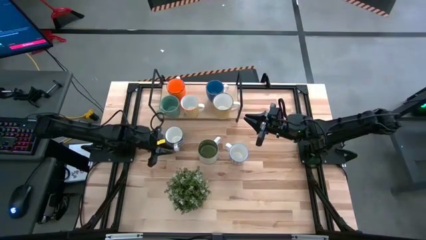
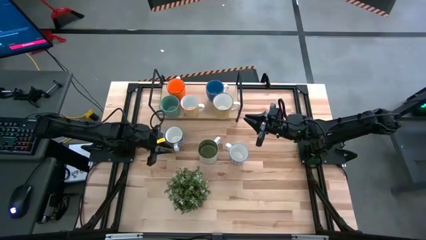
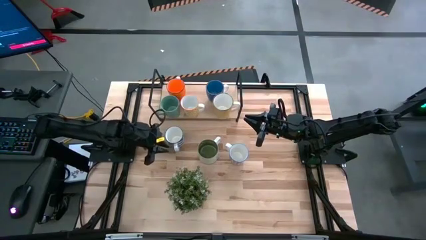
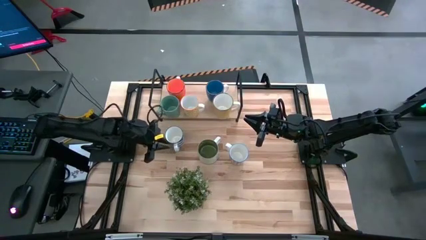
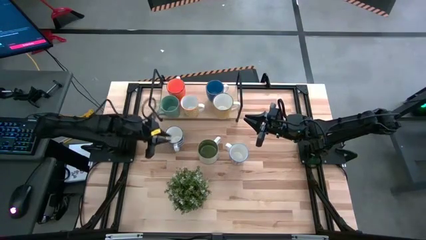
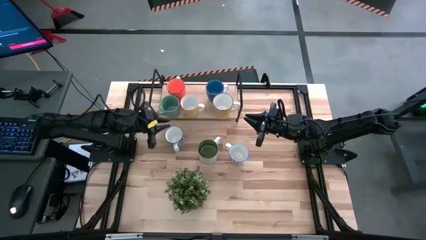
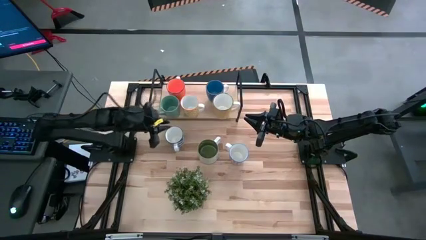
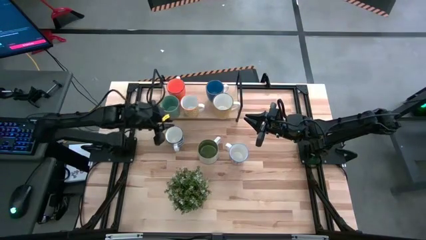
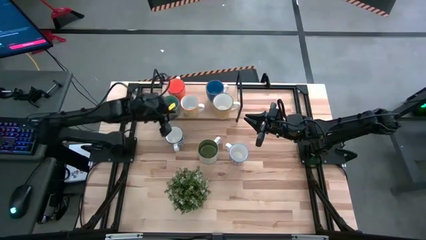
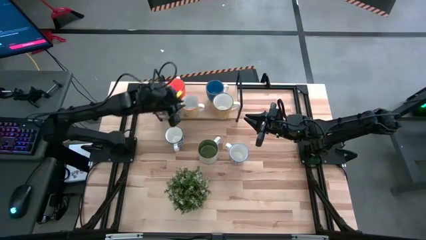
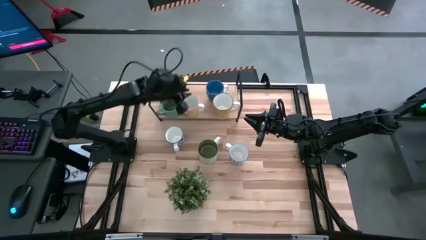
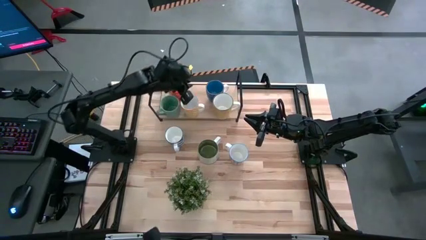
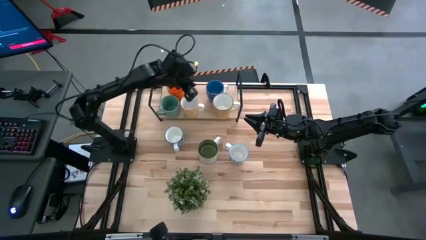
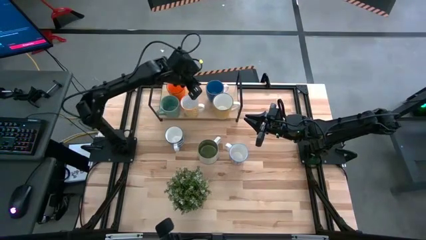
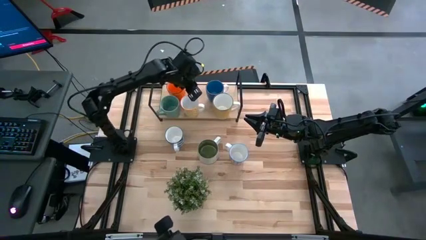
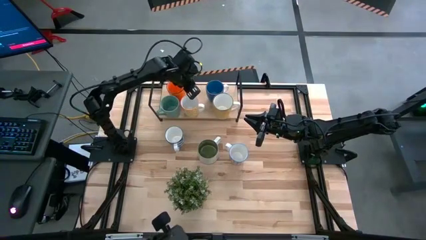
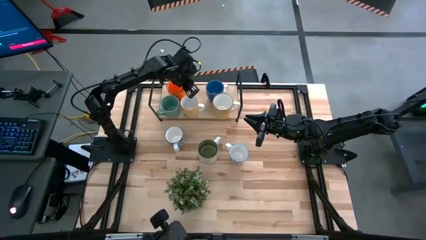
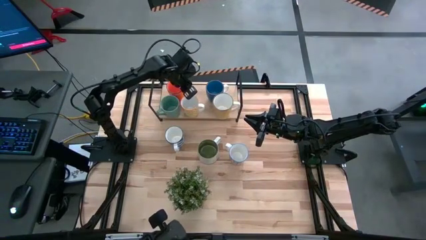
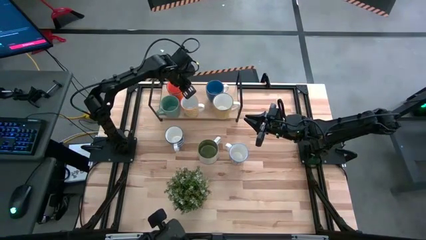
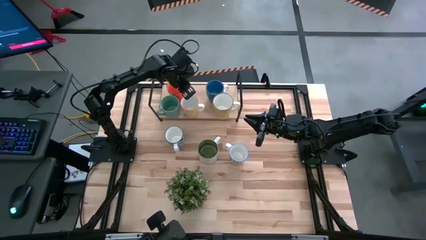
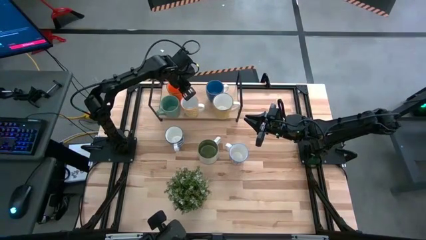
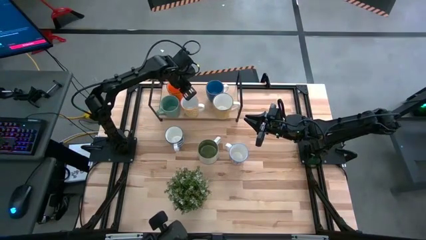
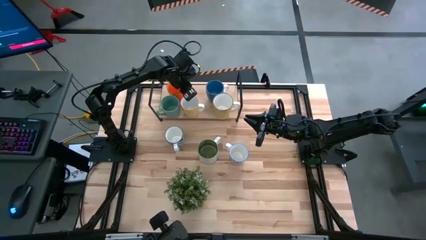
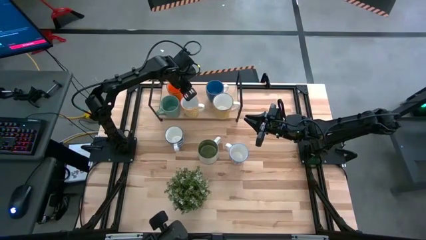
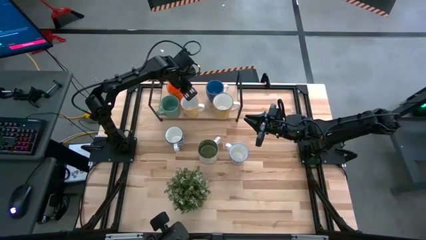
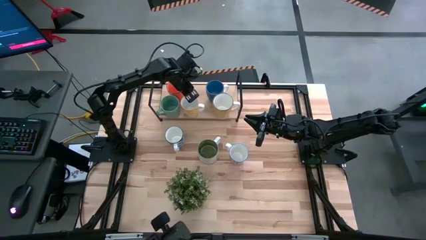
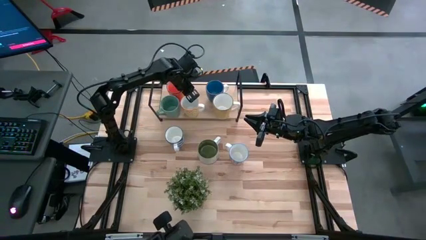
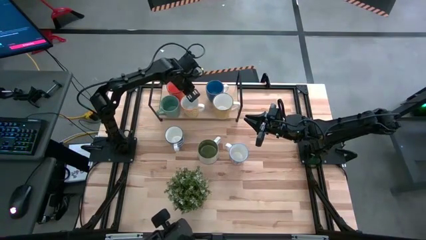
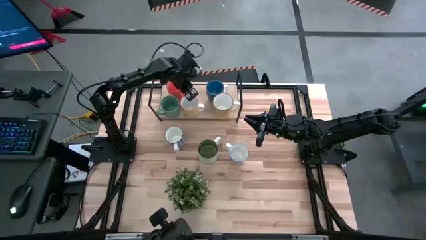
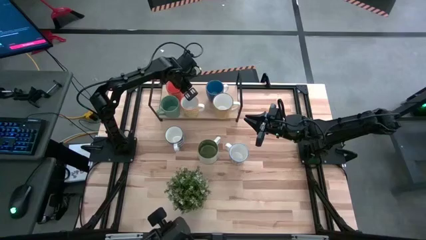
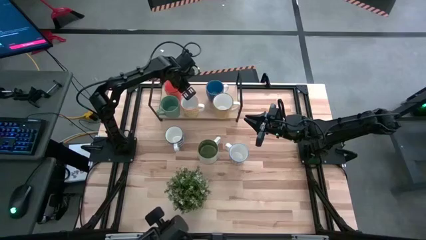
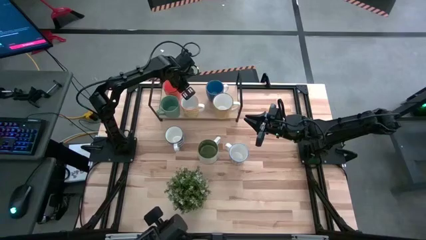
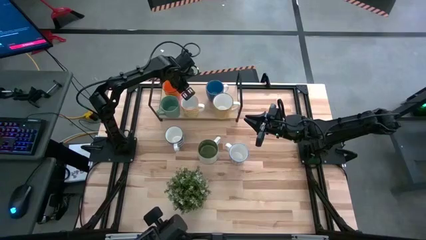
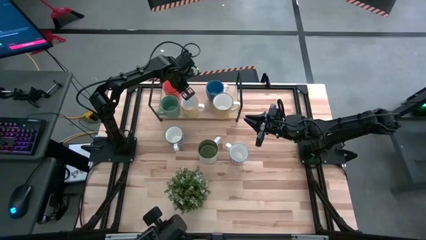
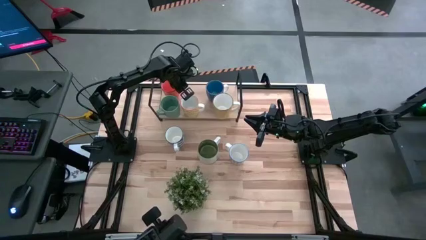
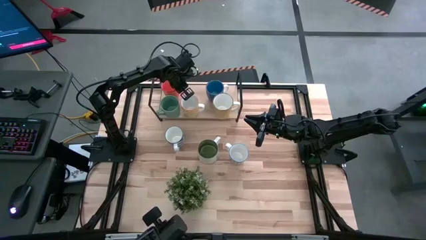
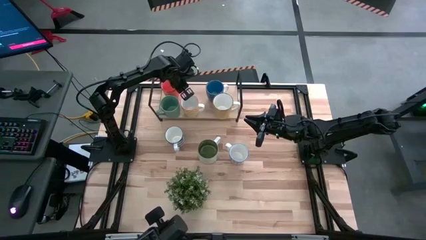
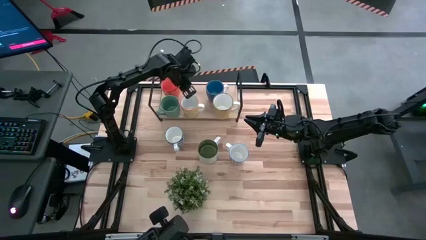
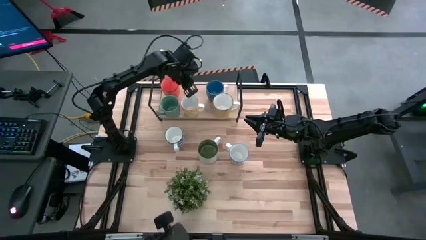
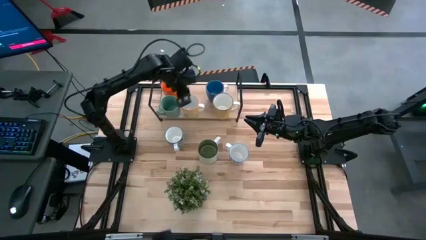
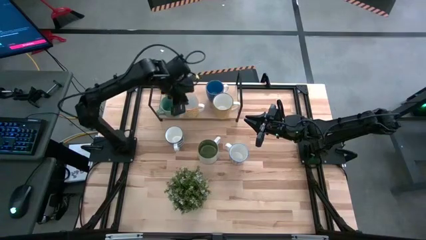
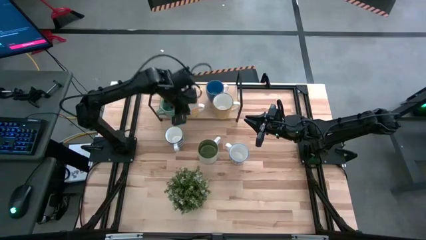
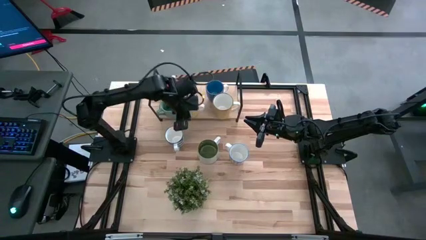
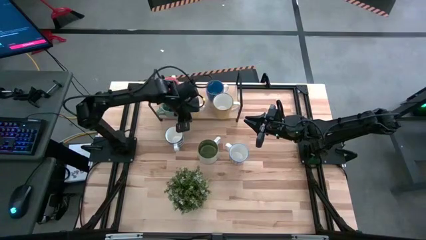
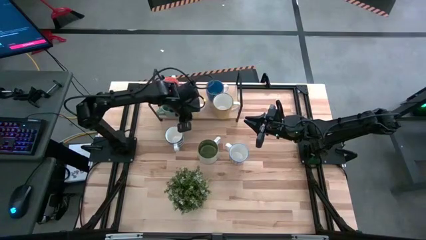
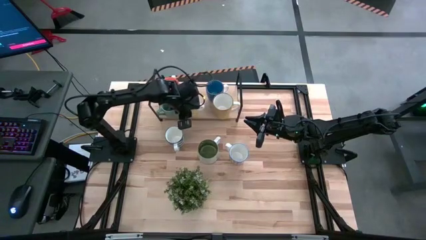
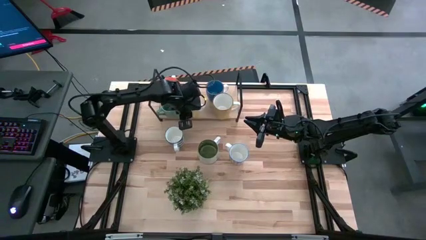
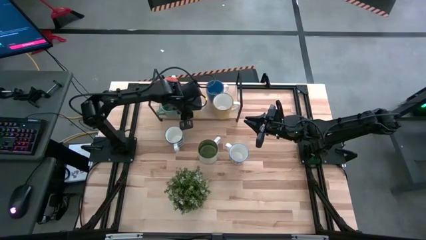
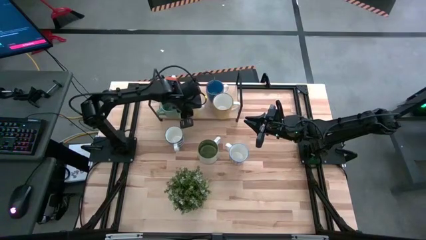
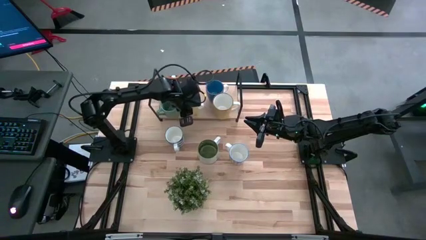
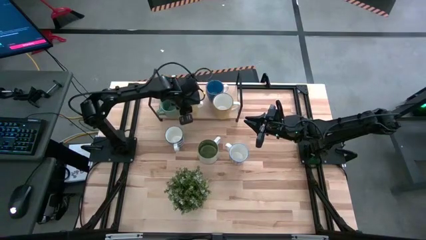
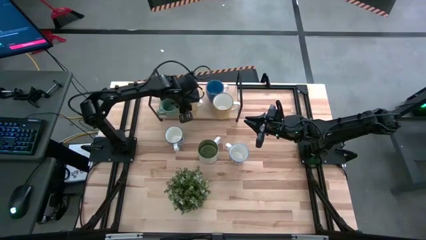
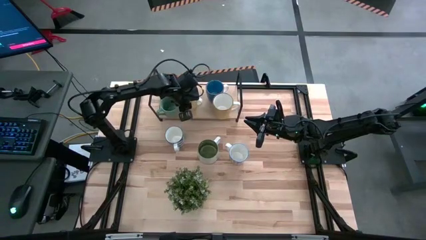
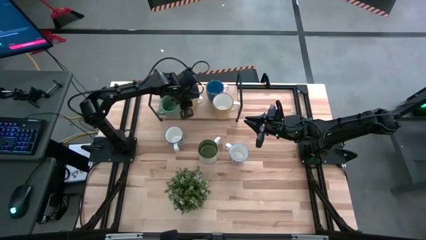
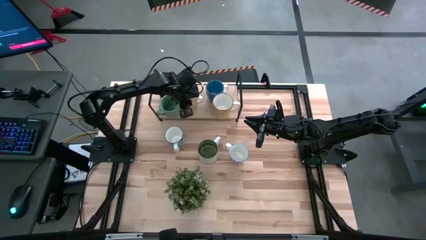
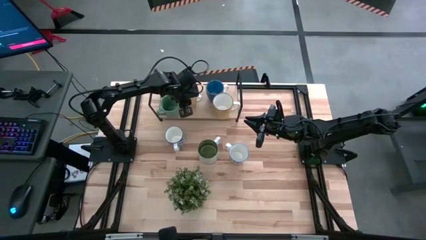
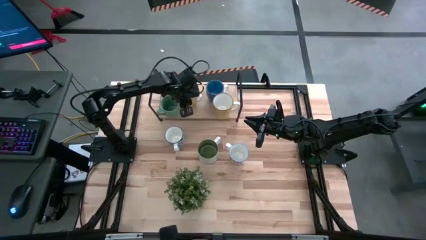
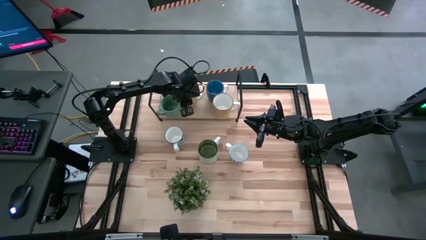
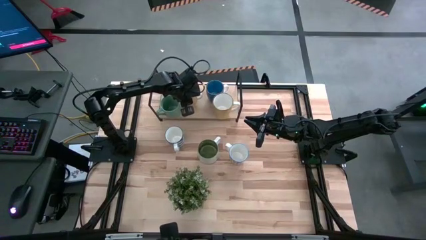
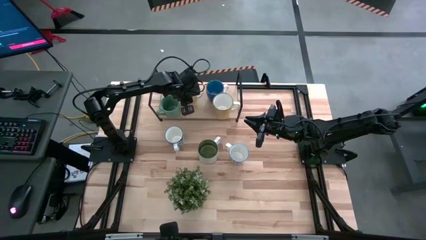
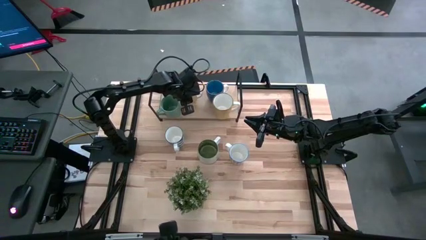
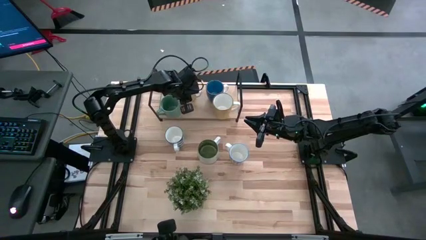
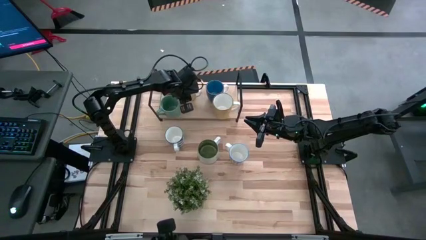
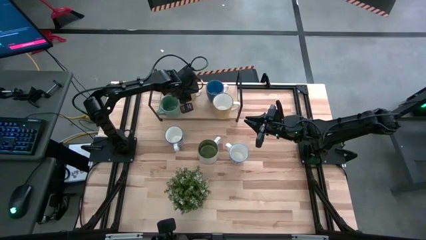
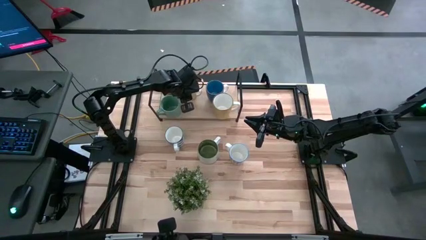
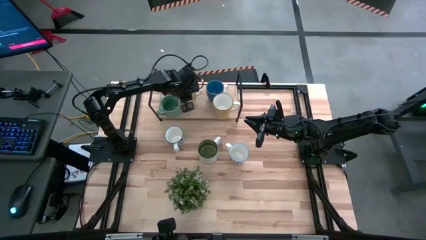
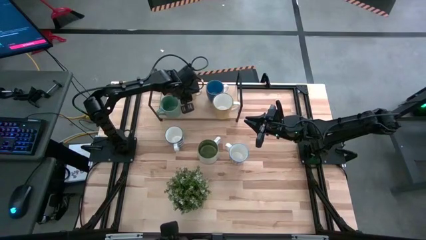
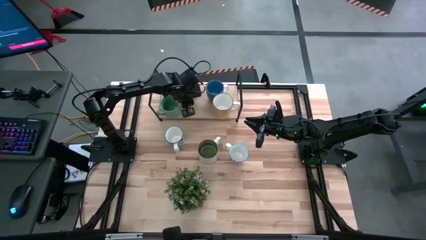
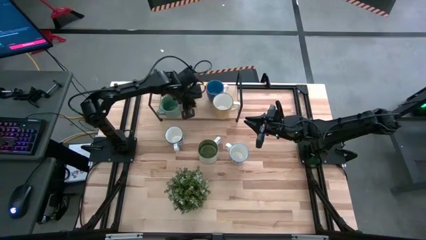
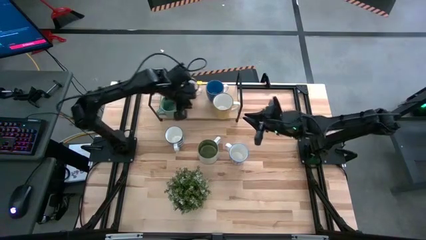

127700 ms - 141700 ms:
Task: Place coffee mugs
Adjust the colored mugs on the shelf

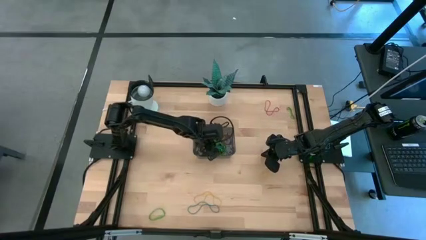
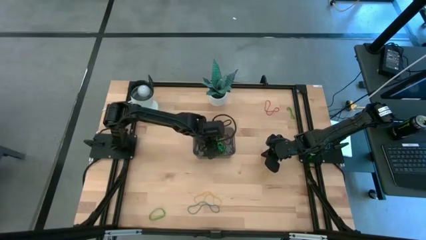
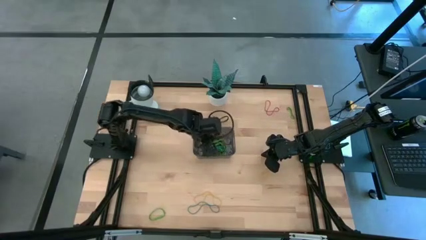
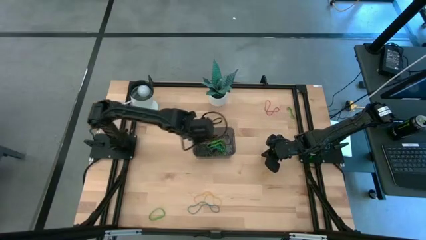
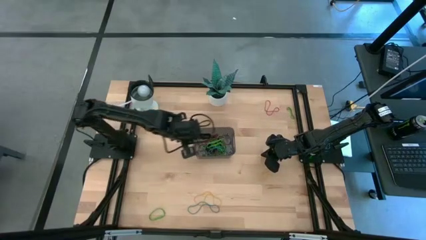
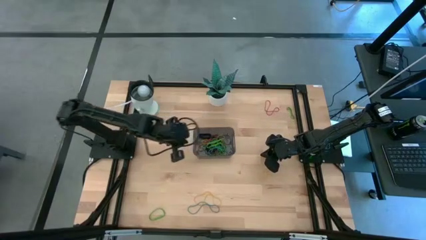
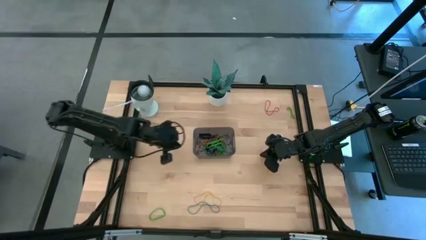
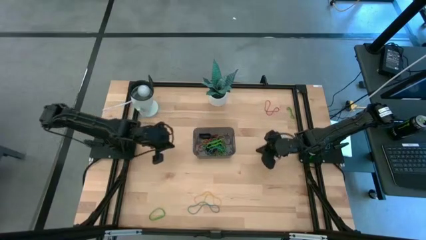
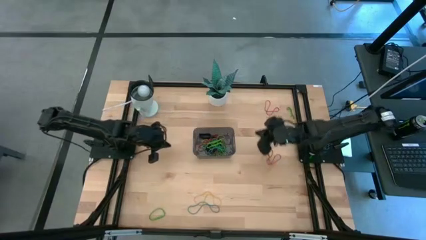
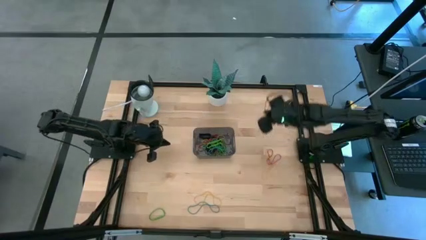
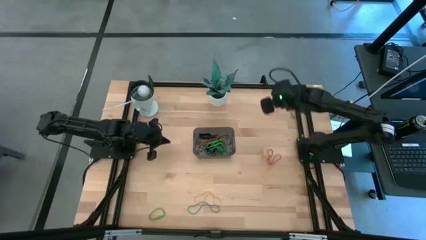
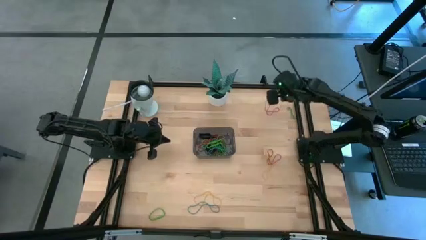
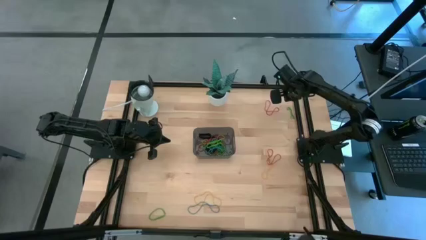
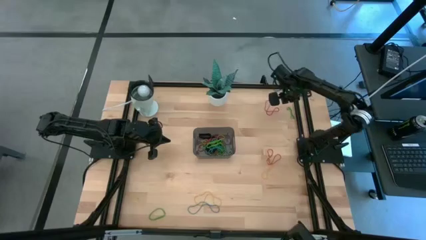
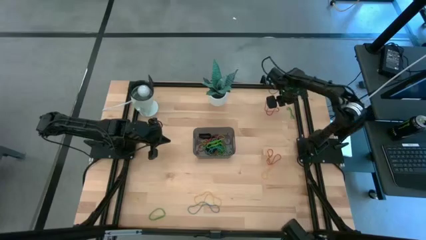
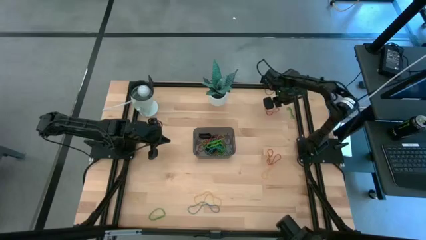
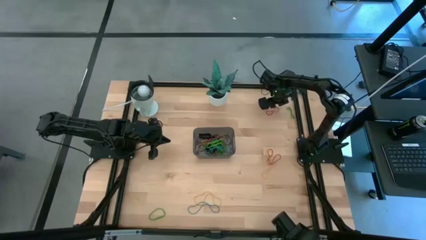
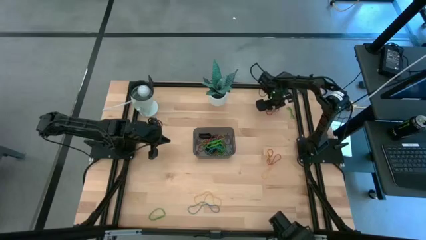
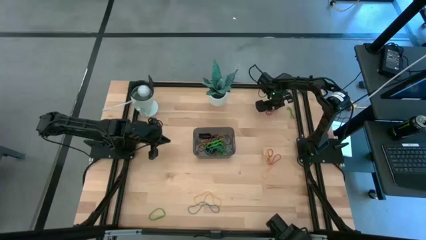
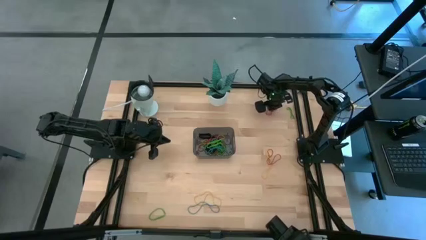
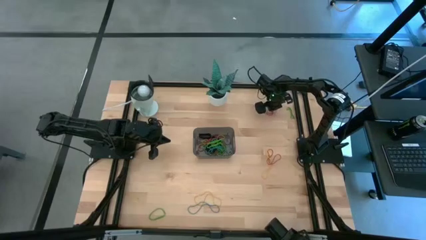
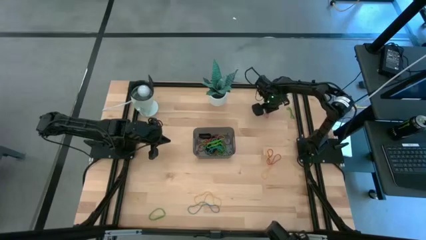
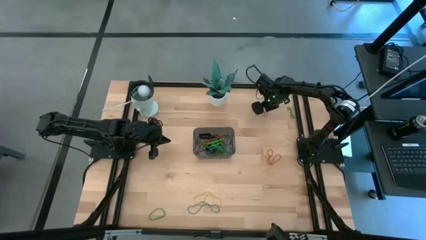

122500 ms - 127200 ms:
Task: Pick and place rubber bands into bin
Put the red rubber band into the black bin
